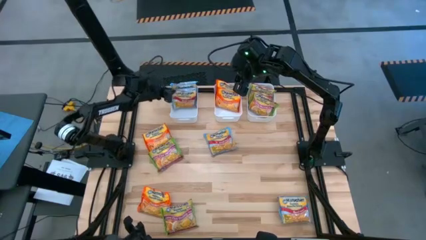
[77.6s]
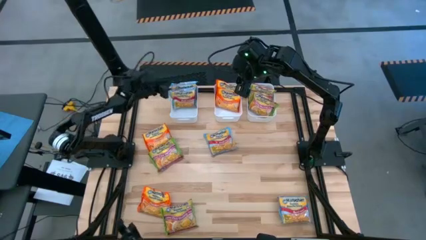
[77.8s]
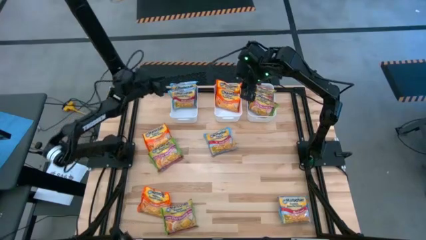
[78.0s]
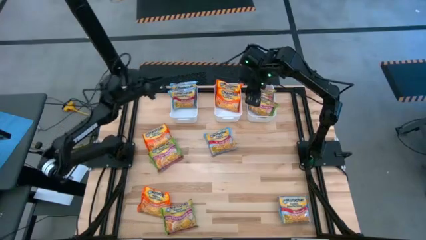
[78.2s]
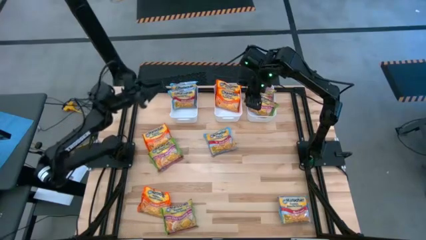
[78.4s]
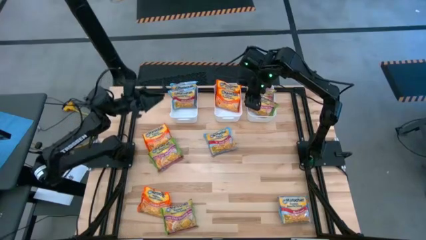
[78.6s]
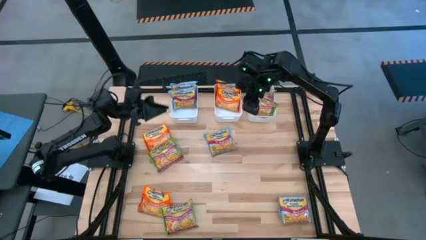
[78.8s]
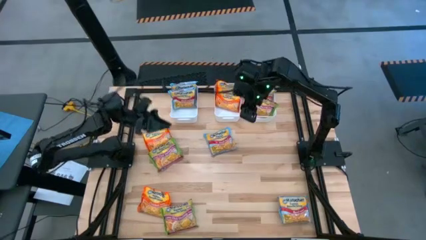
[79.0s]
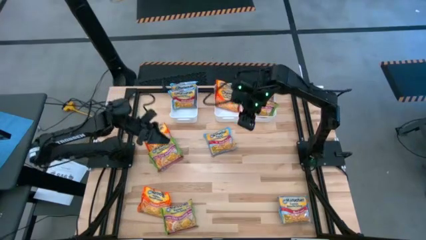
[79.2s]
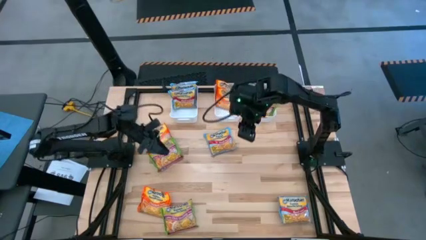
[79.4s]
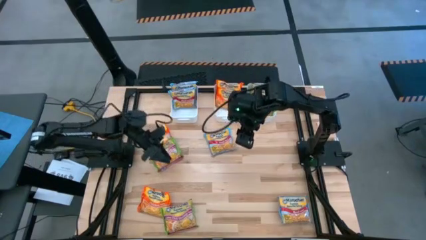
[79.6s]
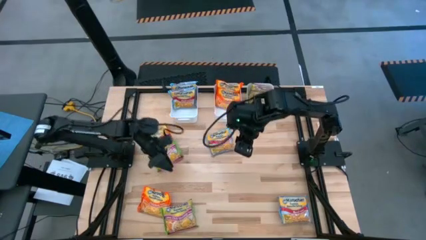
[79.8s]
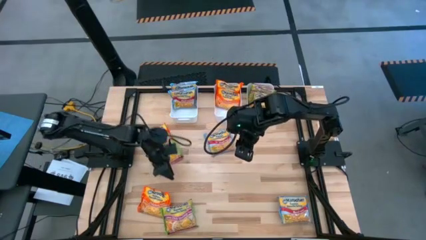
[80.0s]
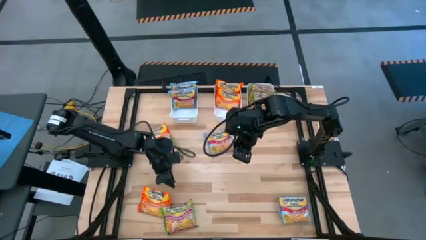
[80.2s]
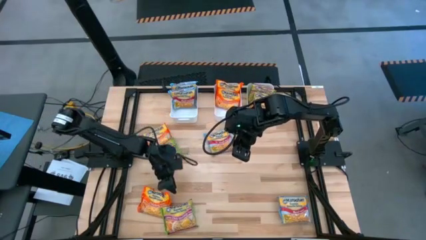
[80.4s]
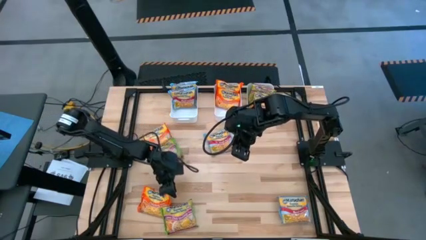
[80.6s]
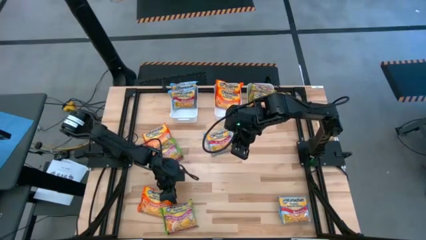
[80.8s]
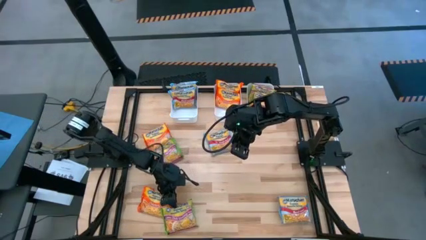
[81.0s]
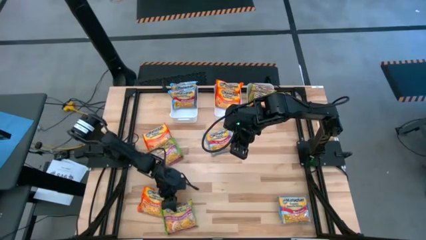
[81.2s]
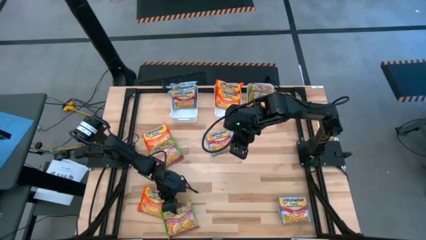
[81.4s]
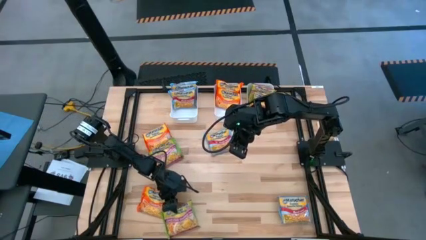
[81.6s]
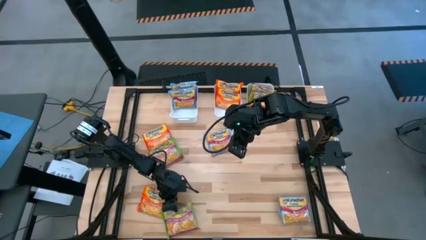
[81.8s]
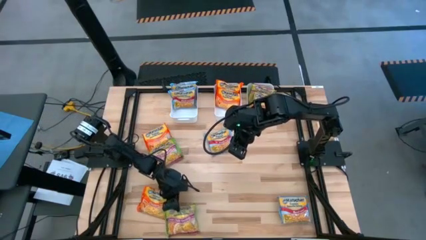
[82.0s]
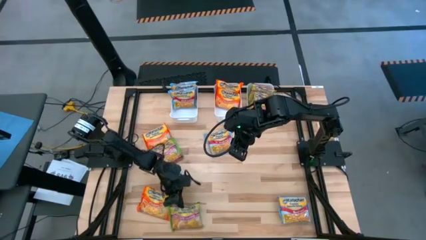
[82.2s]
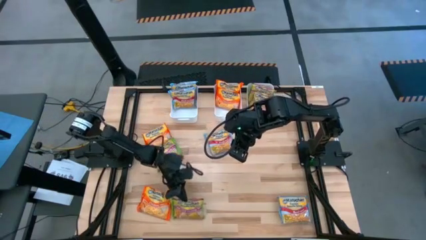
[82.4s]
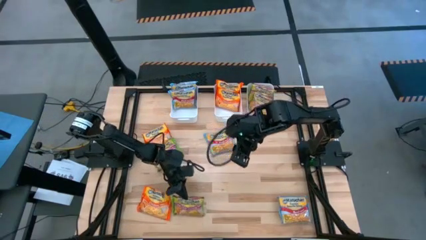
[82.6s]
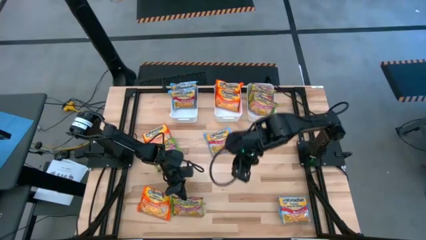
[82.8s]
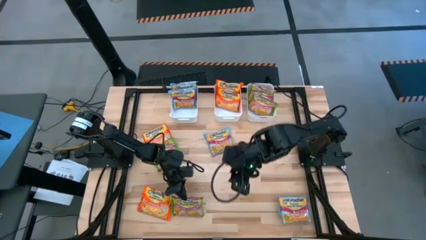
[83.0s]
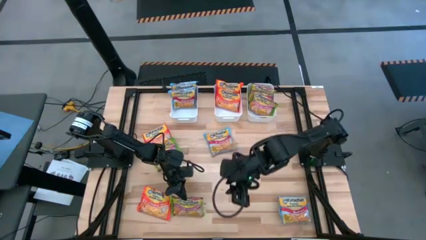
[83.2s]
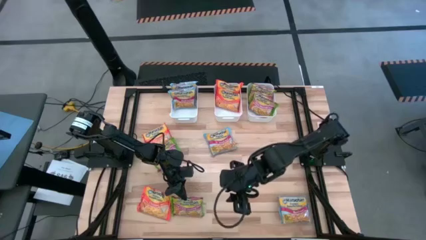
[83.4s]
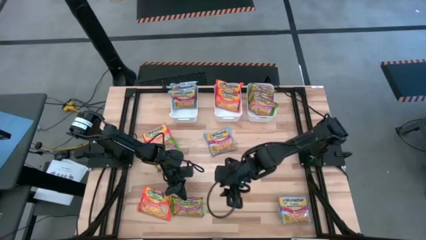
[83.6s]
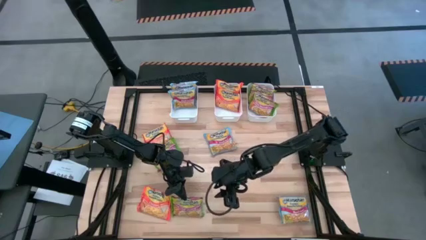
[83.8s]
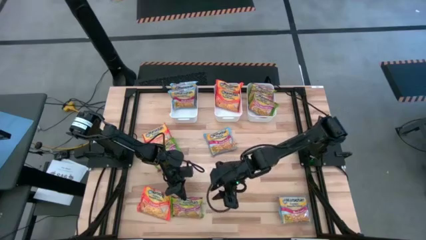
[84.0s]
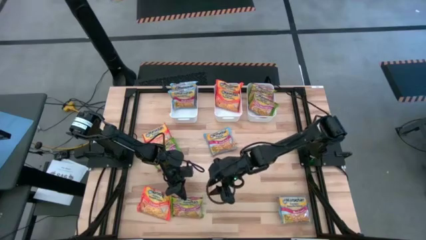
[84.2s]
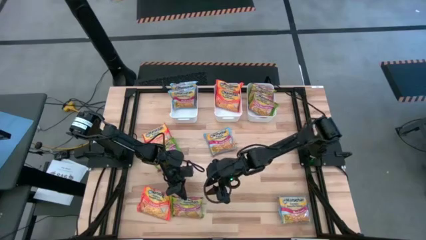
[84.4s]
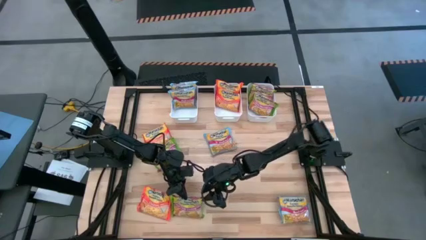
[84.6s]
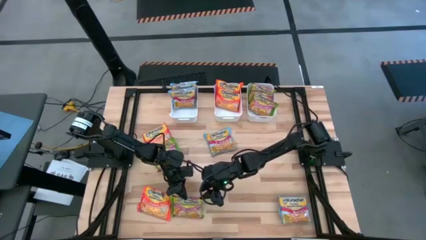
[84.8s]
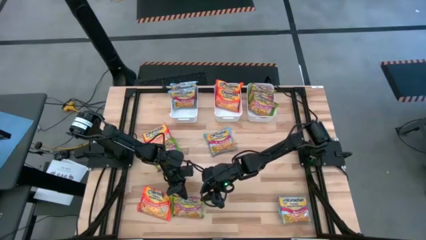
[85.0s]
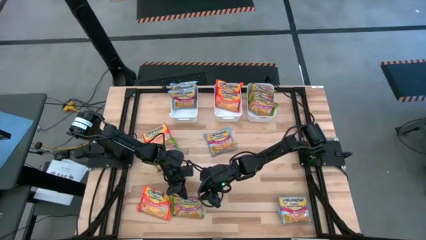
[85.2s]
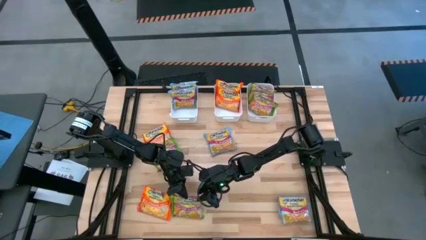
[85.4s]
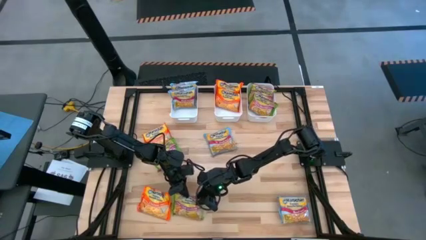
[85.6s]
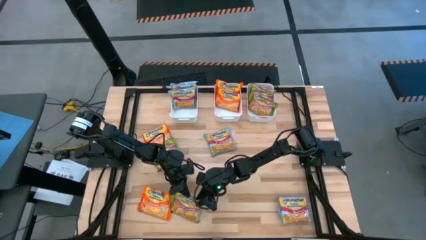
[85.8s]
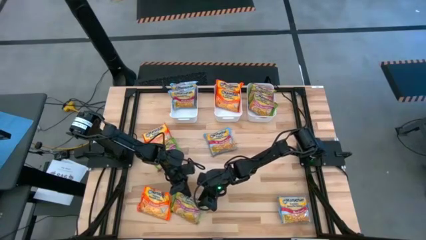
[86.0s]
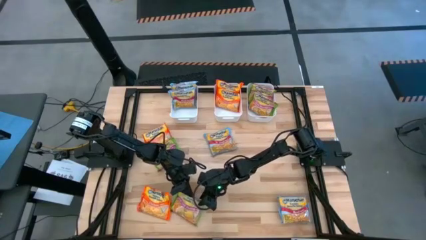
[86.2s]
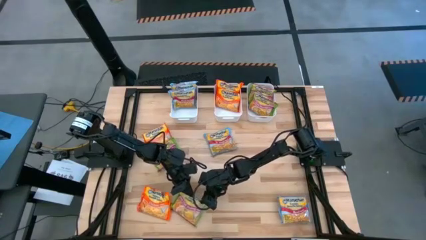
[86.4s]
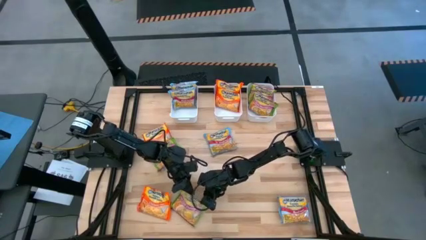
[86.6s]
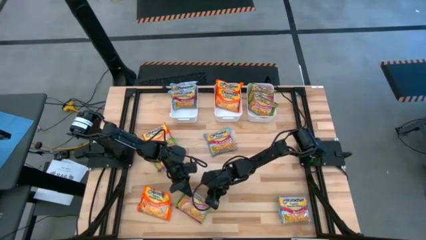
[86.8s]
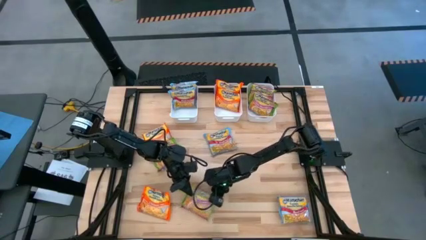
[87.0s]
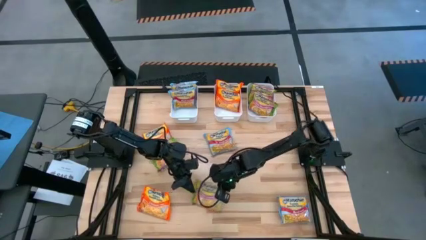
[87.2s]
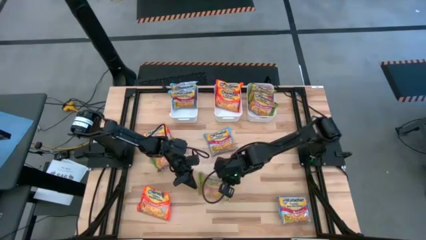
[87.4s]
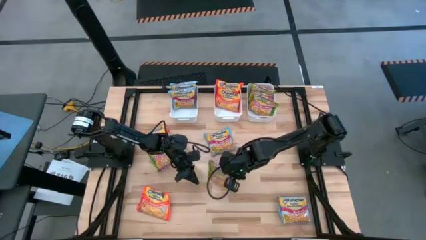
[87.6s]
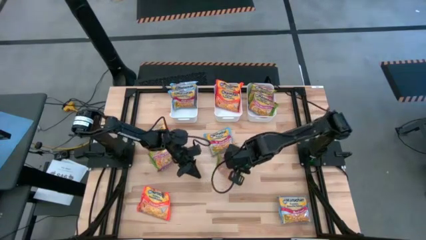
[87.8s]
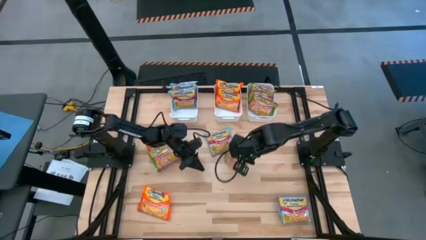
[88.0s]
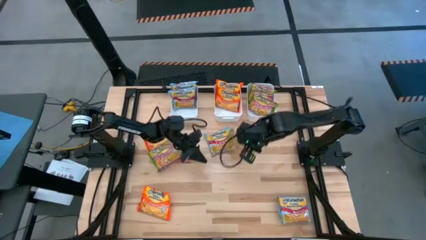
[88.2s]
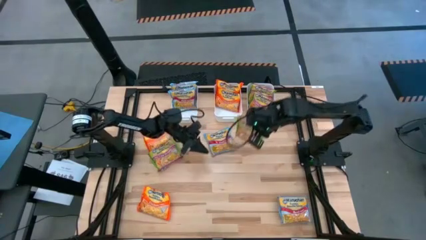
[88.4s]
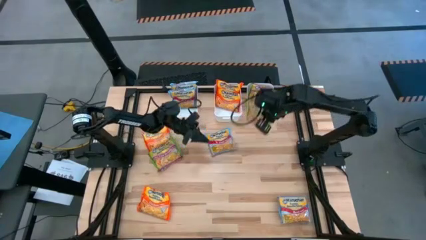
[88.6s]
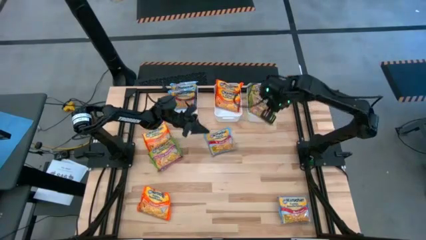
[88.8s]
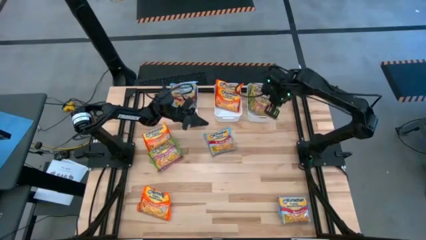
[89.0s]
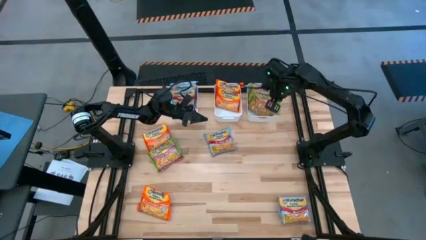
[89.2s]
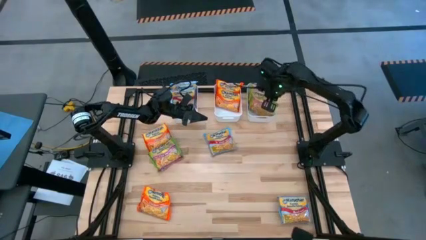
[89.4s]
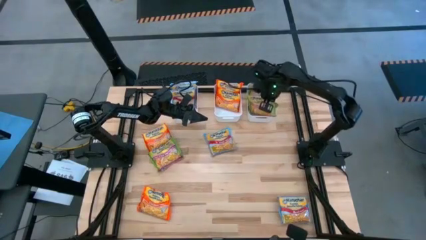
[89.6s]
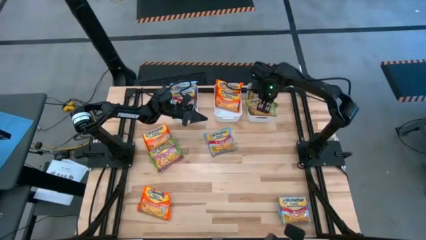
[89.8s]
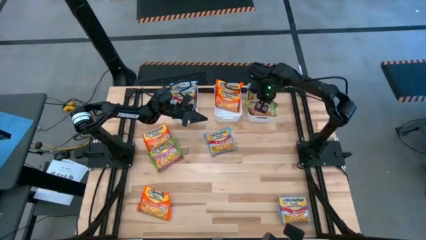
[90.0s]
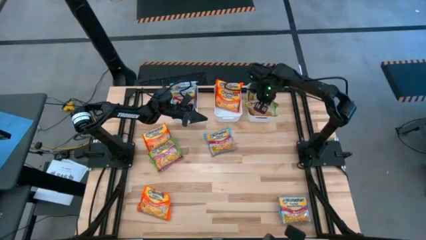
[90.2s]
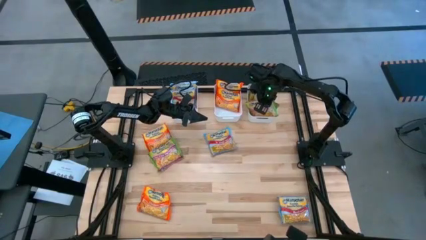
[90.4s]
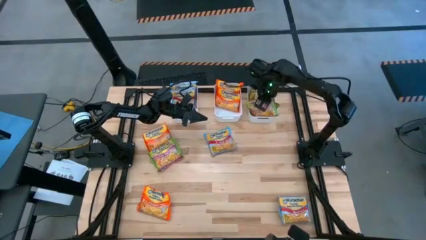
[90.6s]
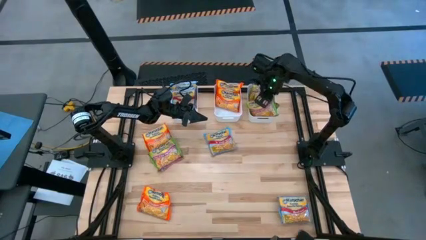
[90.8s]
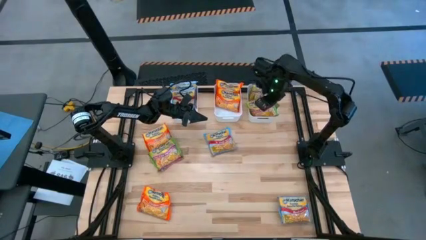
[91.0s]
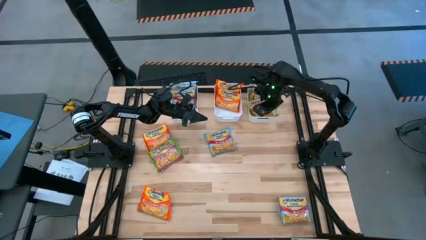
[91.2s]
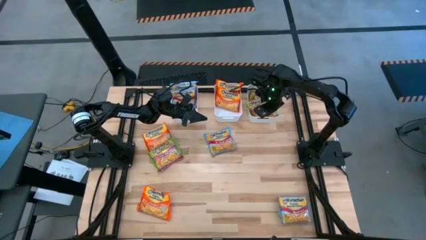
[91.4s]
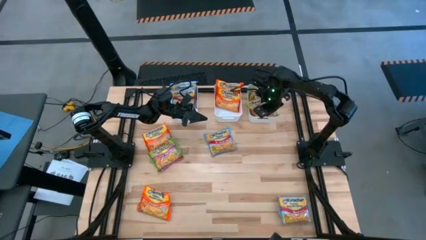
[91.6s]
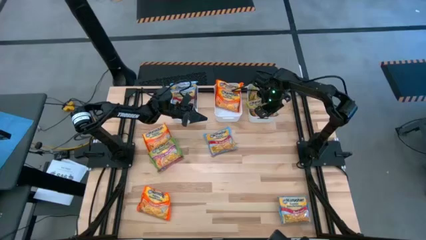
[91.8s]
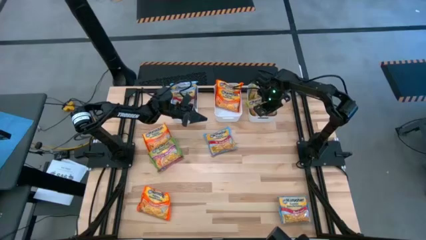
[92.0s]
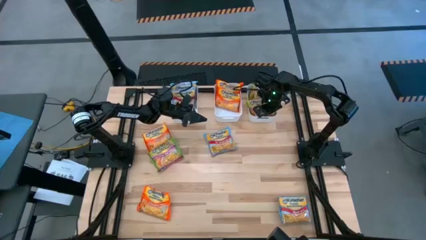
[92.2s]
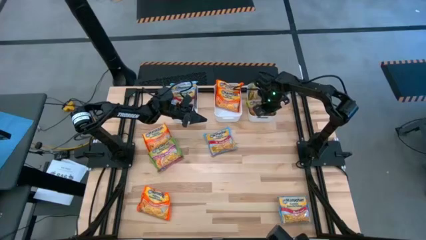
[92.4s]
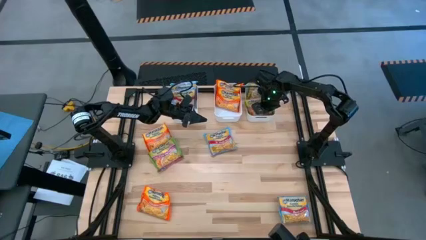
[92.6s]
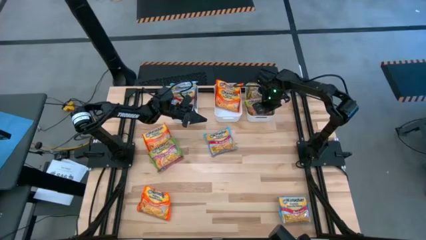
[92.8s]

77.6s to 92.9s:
Task: Sort Maruchan noodles
Put the green noodle pack into the right white bin

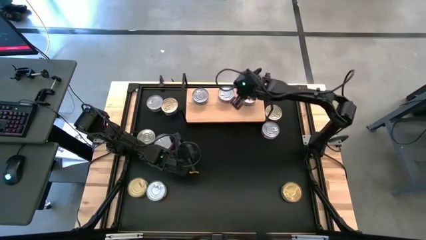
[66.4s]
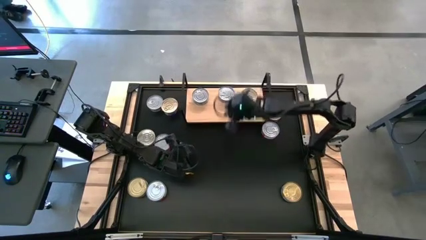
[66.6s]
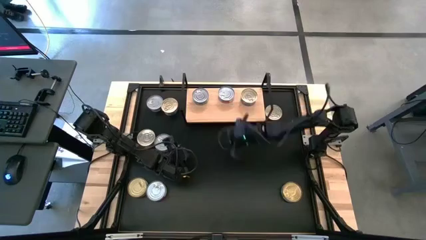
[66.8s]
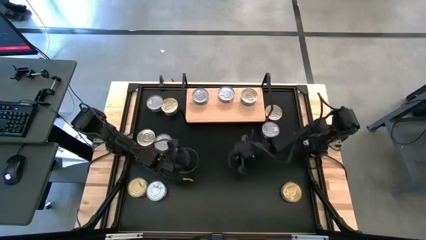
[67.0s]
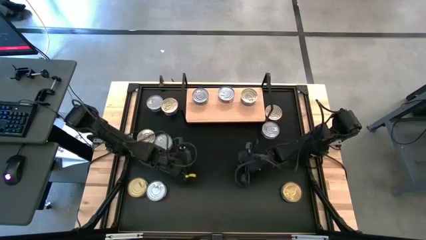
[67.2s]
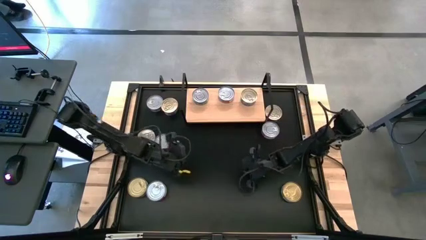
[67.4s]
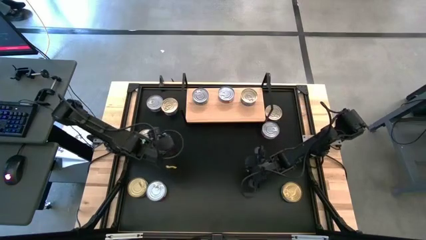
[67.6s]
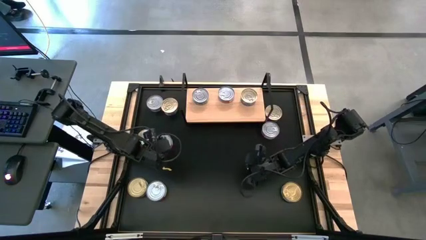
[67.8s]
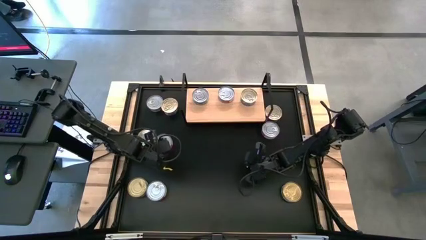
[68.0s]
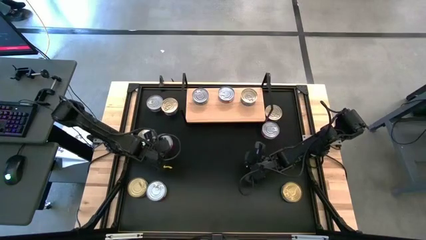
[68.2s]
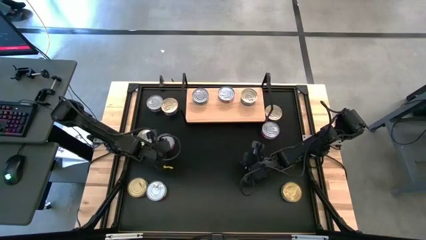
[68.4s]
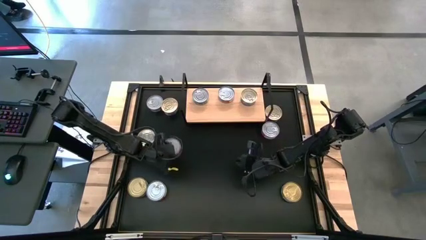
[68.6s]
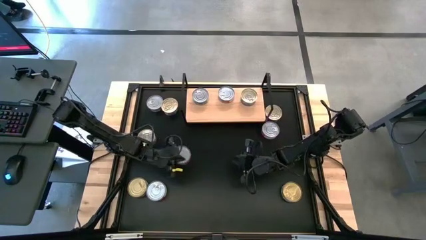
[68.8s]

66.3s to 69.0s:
Task: Stack canned seafood by type on shelf
Put the red tuna can on the shelf aligned with the other red tuna can
